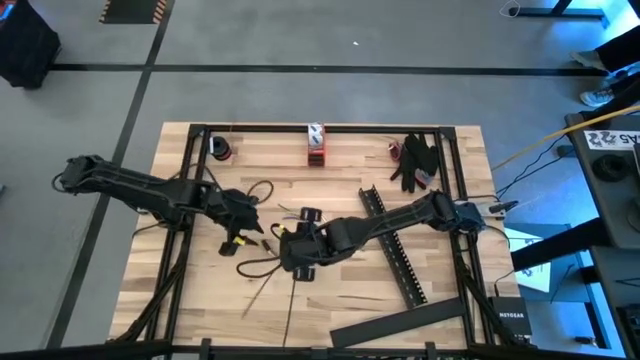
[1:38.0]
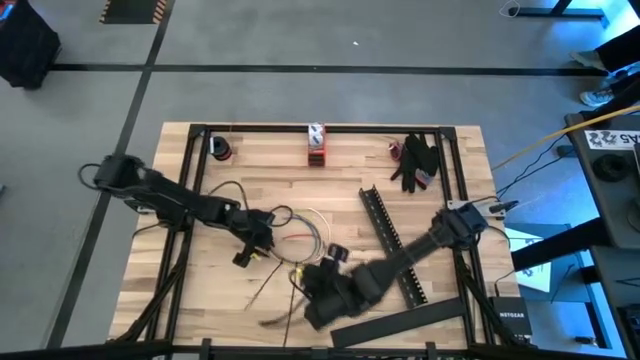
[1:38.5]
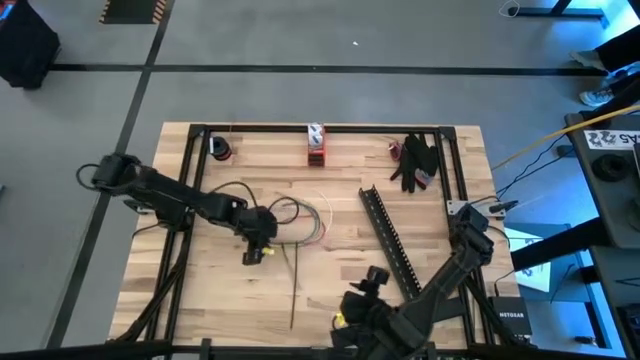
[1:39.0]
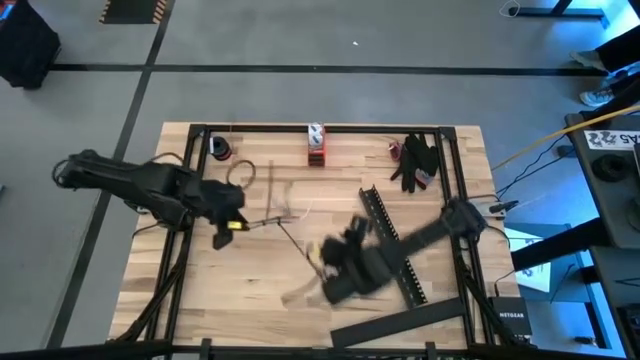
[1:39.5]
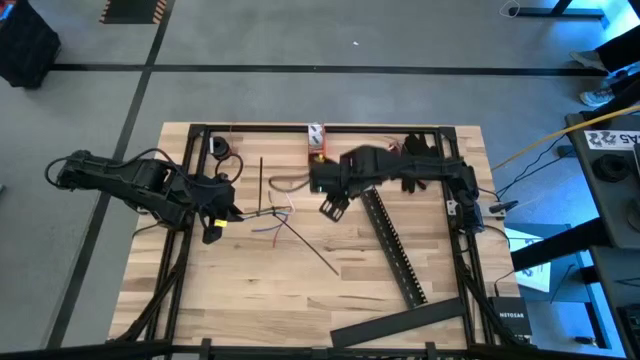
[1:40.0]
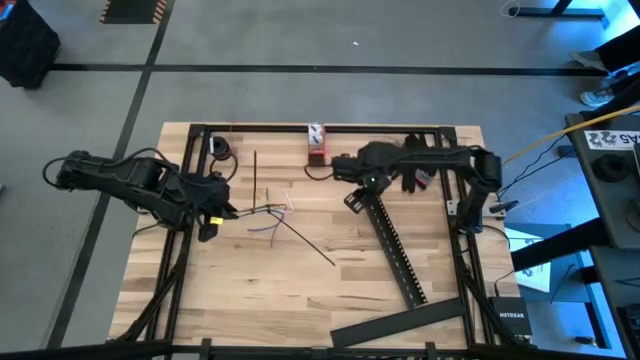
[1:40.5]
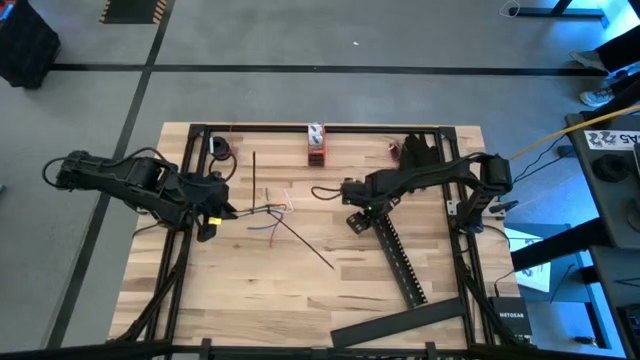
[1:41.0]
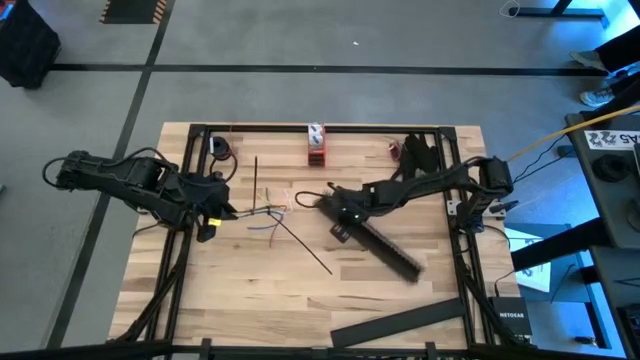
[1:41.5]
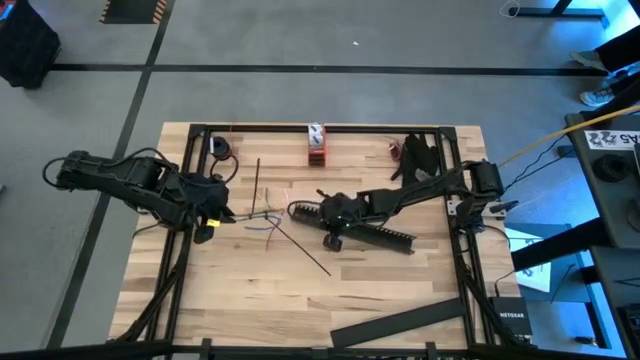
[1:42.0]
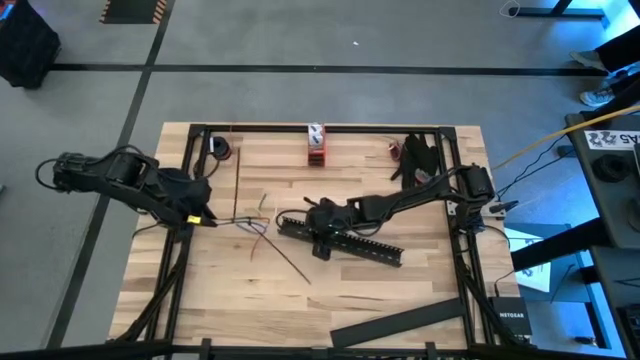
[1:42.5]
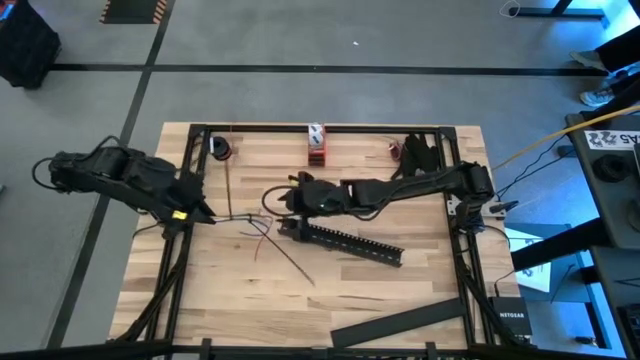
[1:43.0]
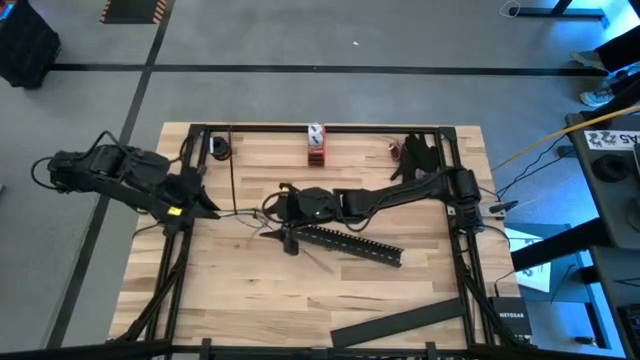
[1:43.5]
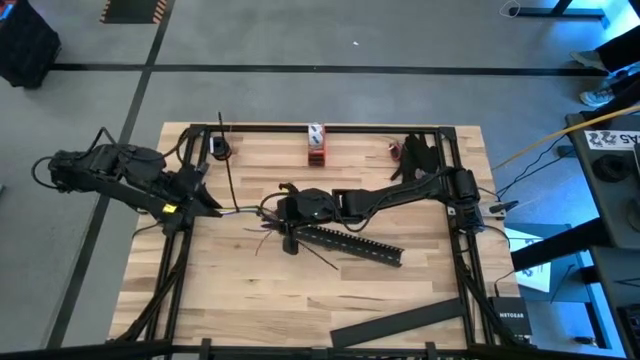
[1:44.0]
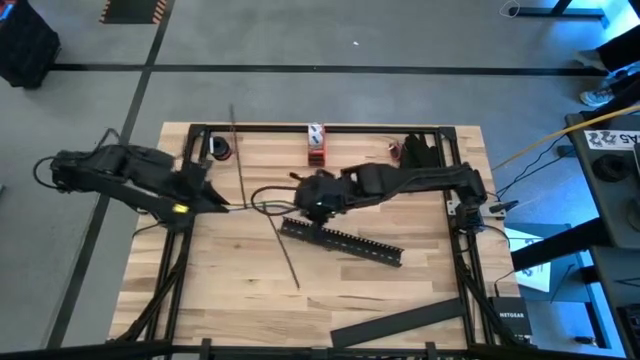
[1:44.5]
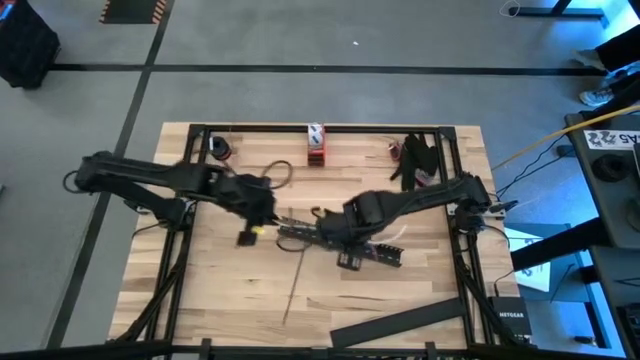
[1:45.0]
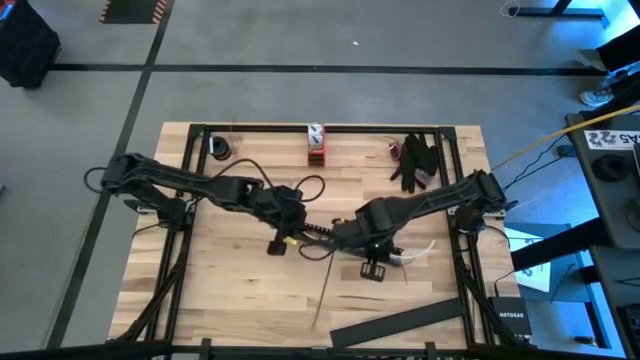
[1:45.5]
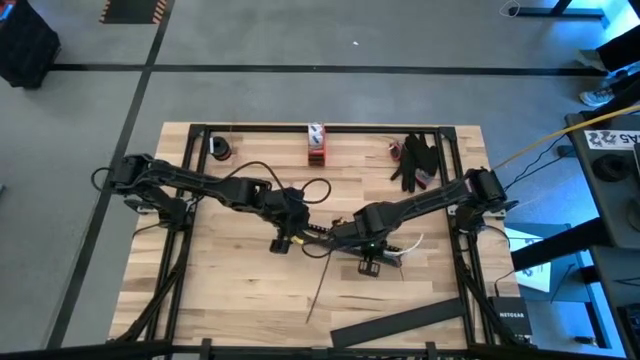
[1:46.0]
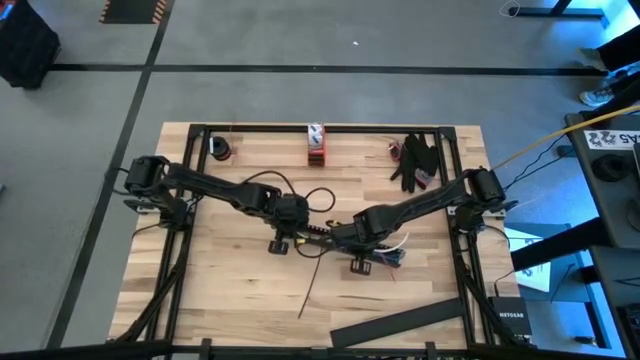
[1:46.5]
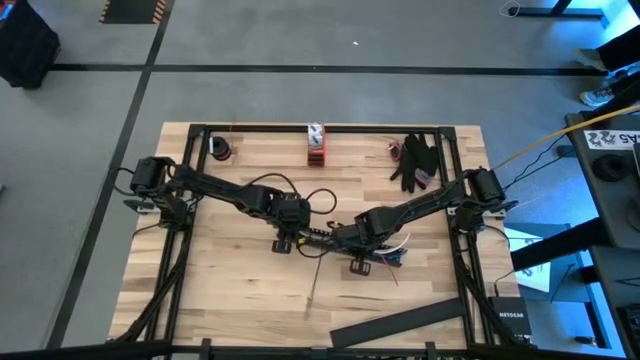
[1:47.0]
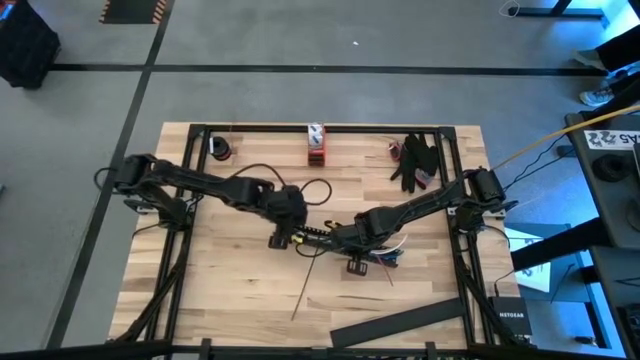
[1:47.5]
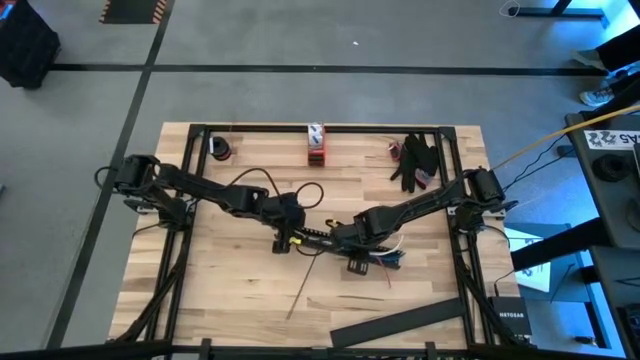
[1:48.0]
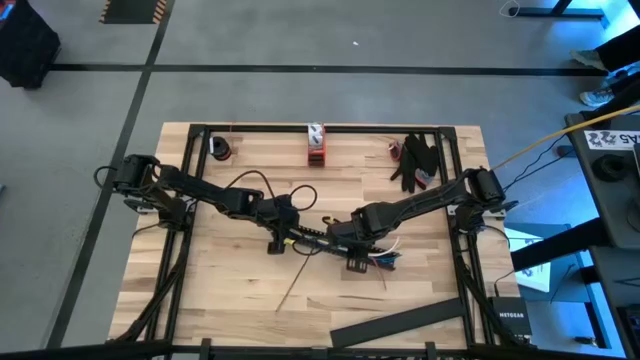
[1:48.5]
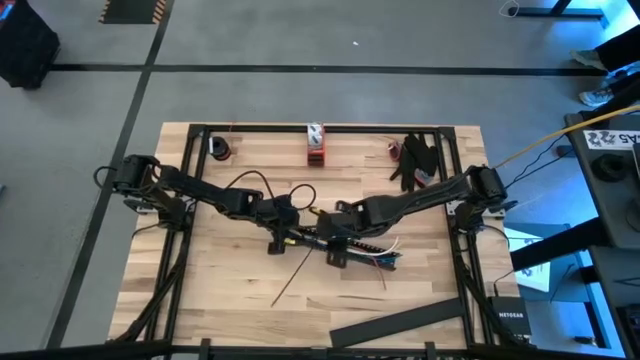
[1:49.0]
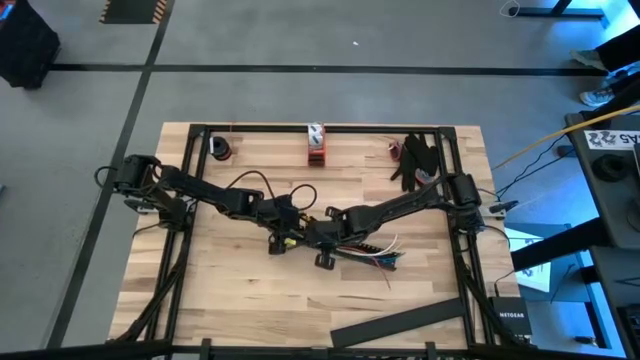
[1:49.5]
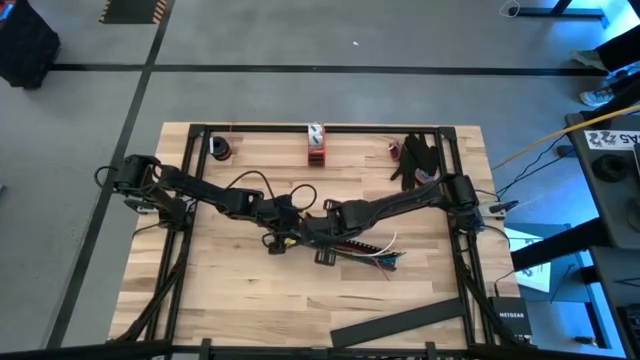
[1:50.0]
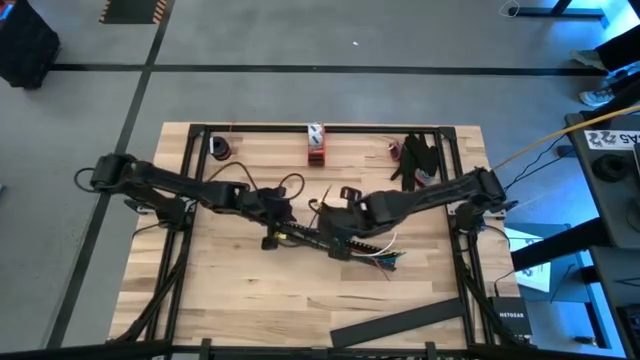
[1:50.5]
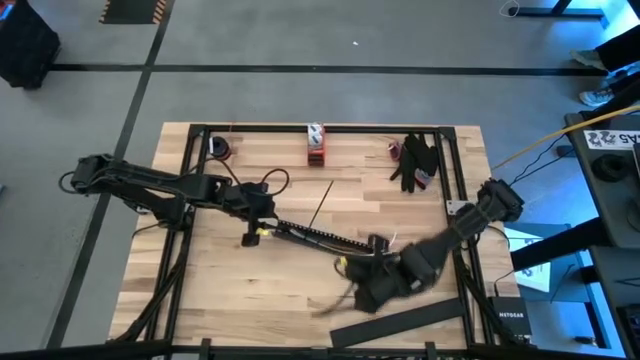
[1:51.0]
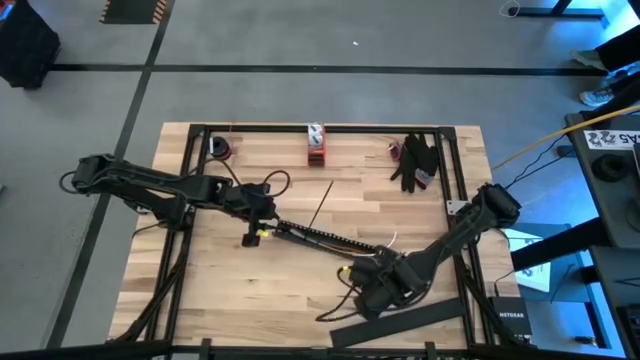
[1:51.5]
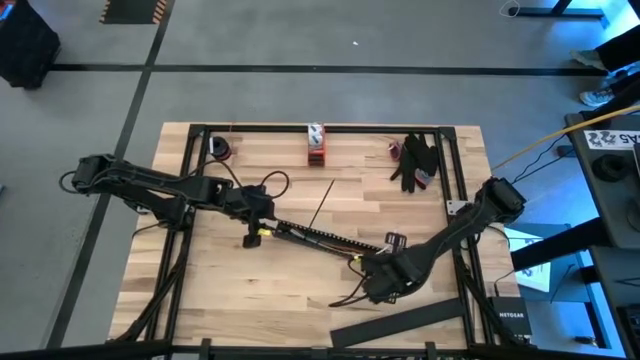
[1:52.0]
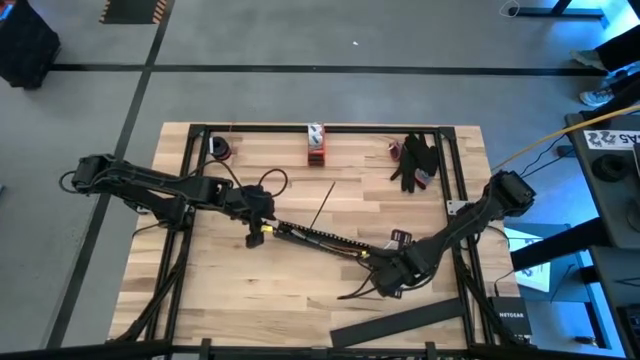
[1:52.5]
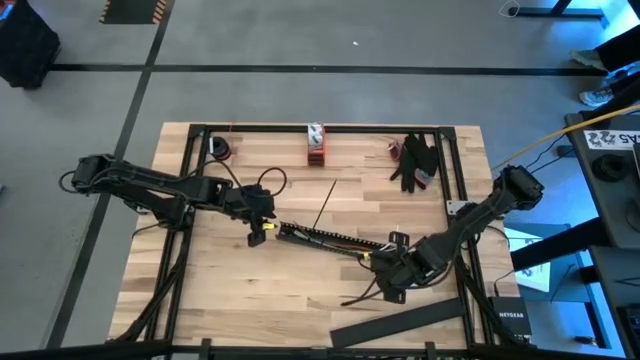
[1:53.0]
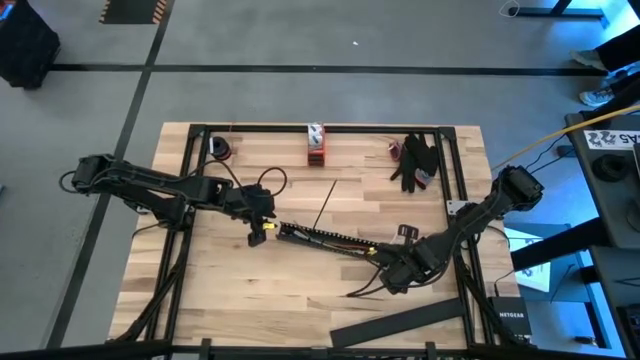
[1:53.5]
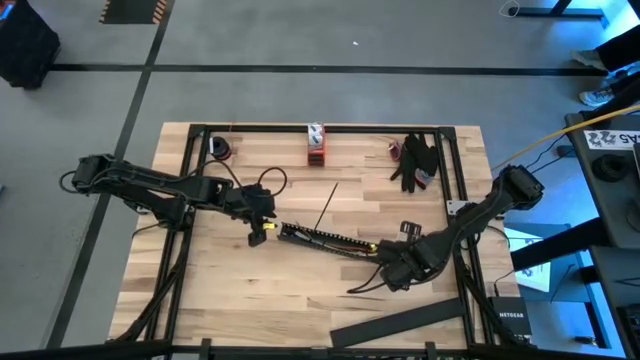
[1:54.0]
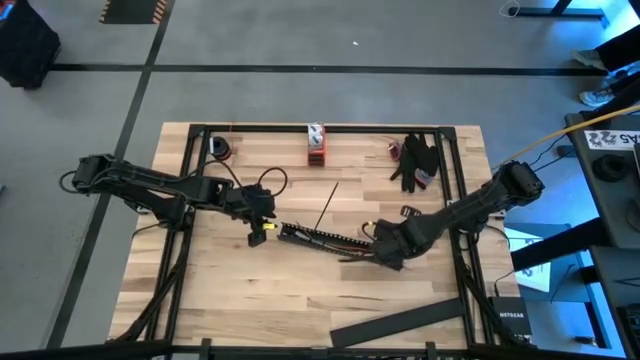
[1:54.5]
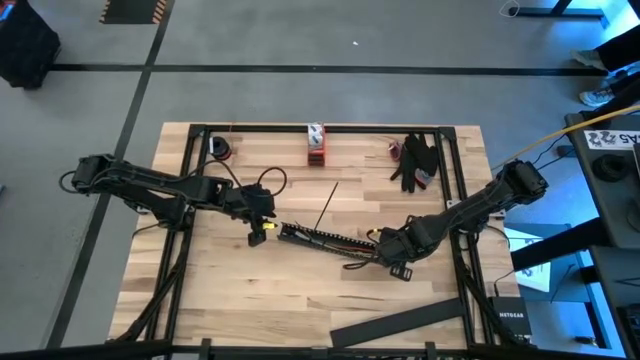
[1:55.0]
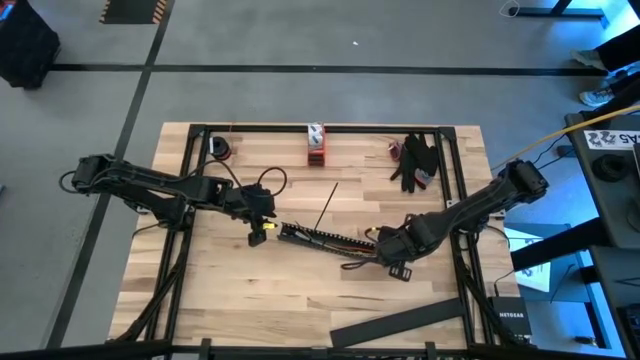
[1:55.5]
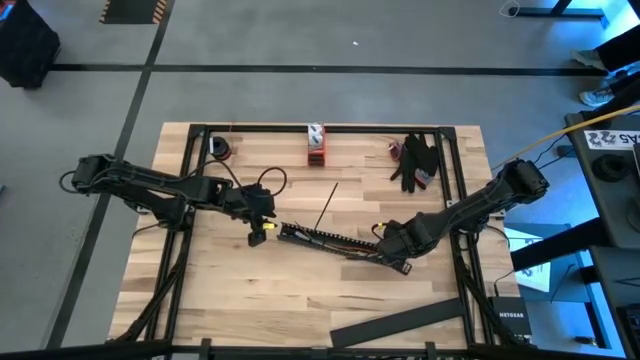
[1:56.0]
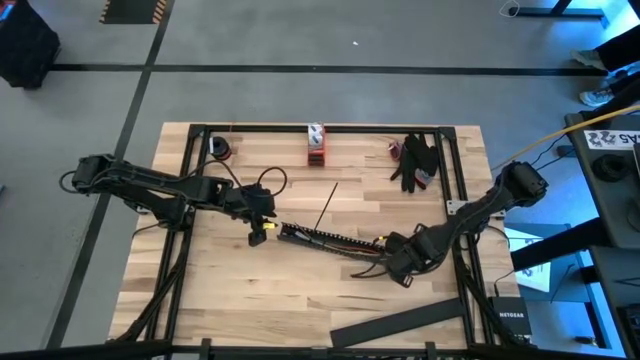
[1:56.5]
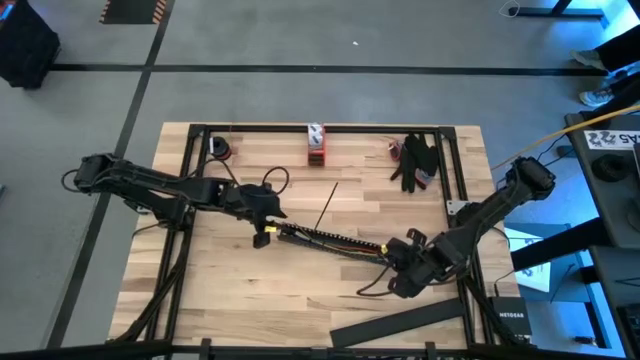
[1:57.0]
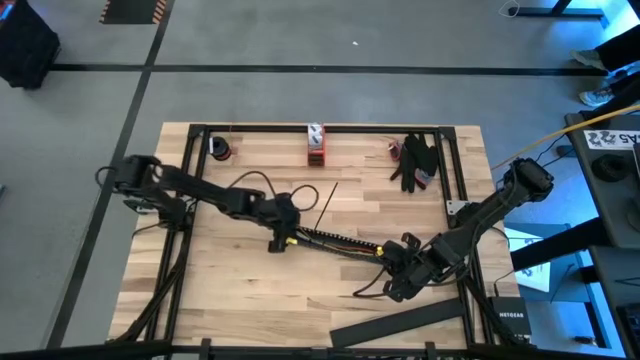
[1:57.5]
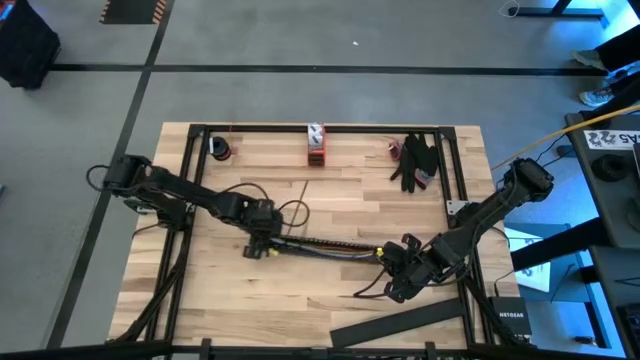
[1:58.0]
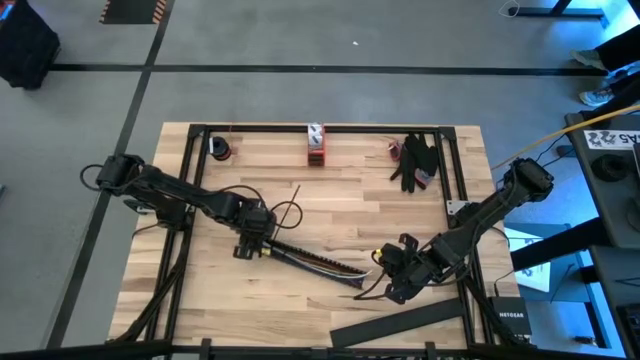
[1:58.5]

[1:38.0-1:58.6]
Task: Ziptie cables
Put the wrapped cable wires into the black cable duct
